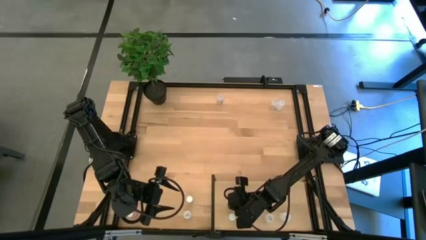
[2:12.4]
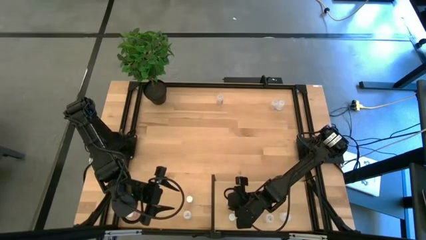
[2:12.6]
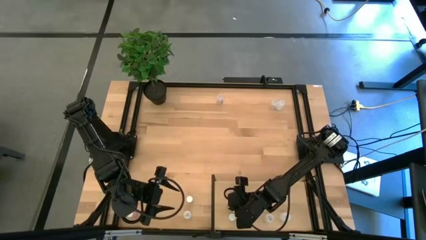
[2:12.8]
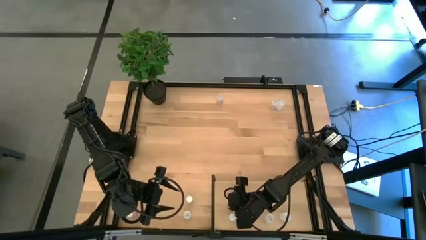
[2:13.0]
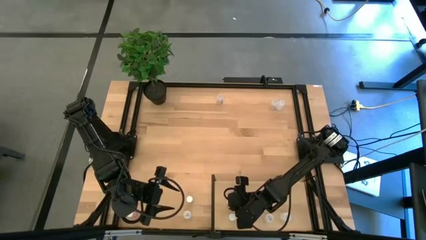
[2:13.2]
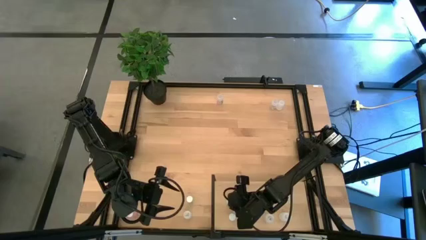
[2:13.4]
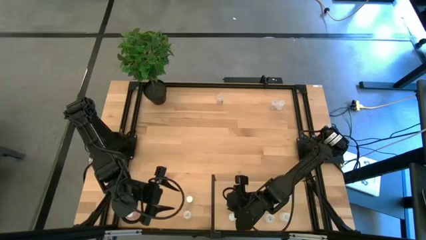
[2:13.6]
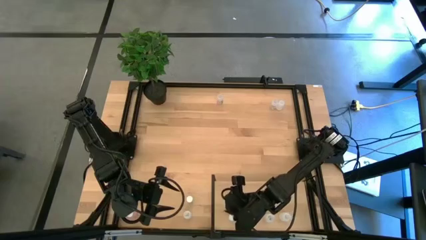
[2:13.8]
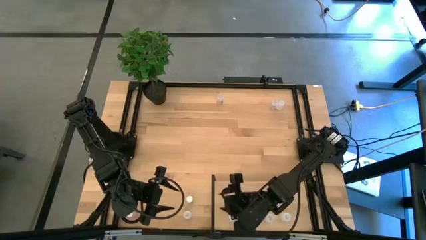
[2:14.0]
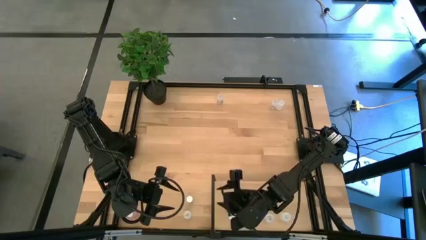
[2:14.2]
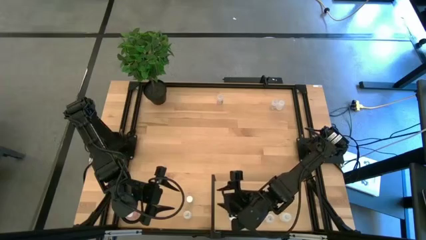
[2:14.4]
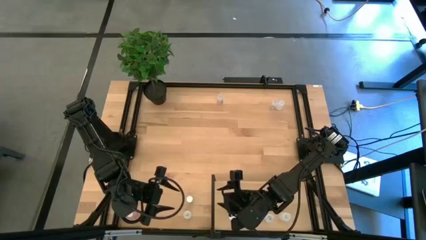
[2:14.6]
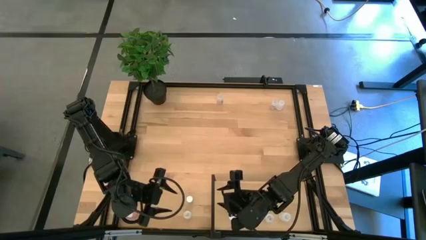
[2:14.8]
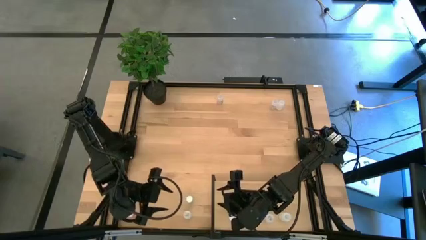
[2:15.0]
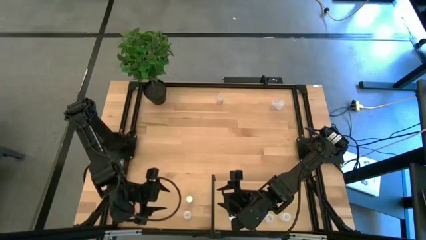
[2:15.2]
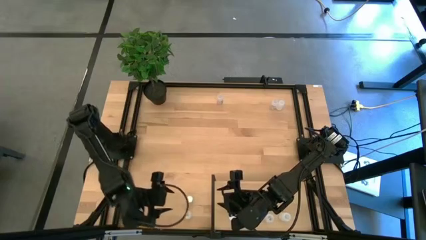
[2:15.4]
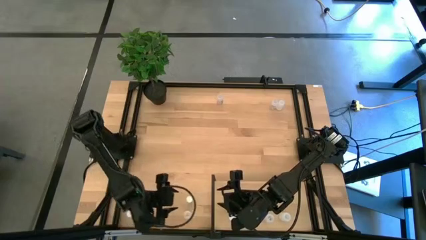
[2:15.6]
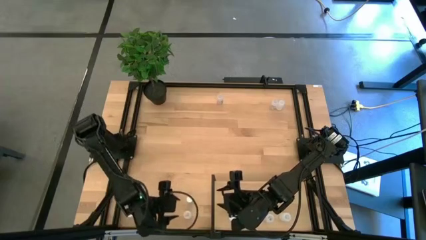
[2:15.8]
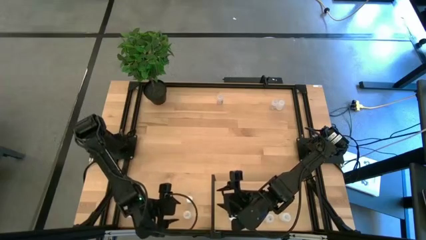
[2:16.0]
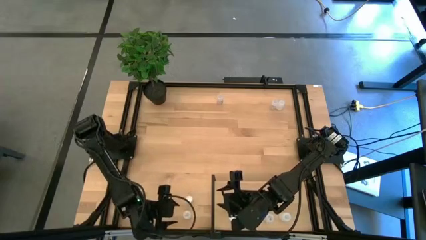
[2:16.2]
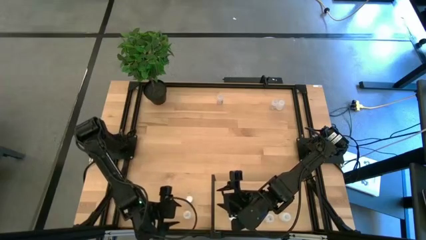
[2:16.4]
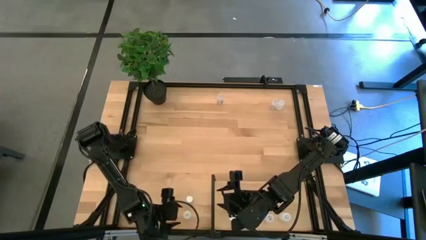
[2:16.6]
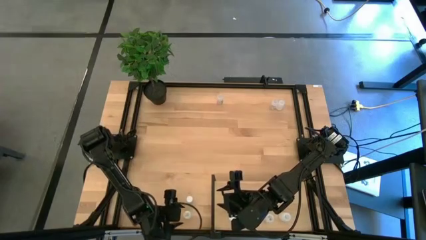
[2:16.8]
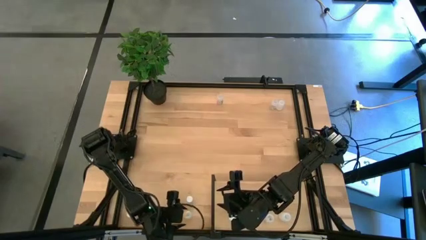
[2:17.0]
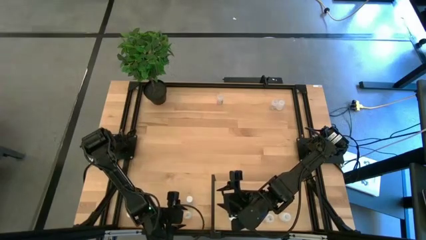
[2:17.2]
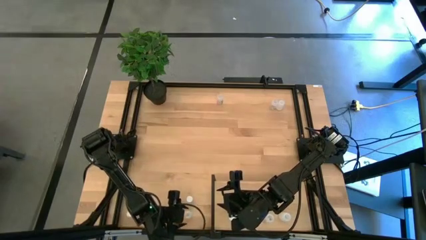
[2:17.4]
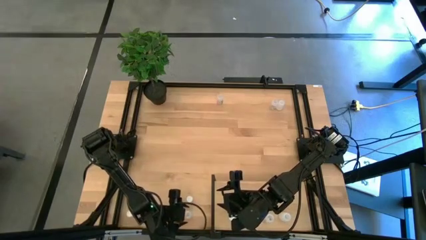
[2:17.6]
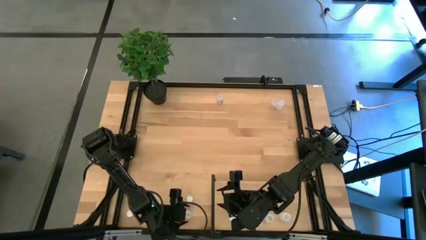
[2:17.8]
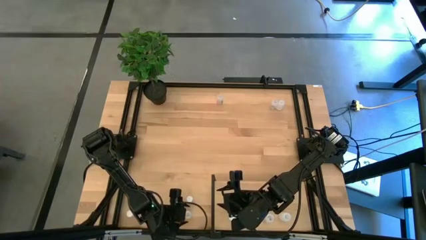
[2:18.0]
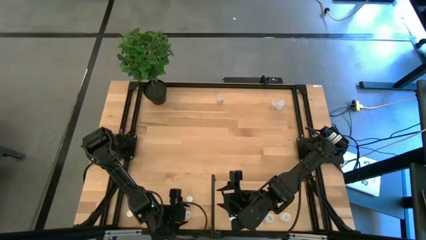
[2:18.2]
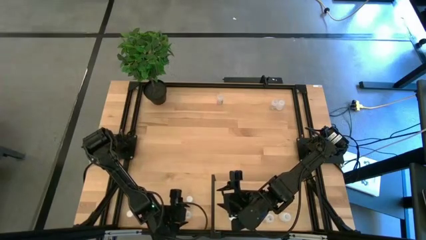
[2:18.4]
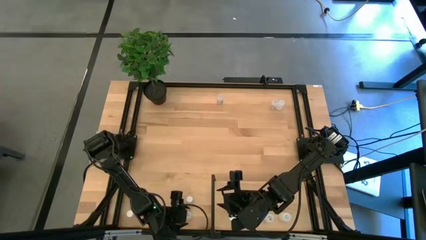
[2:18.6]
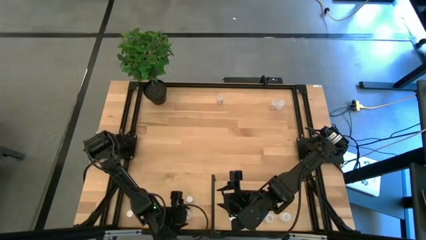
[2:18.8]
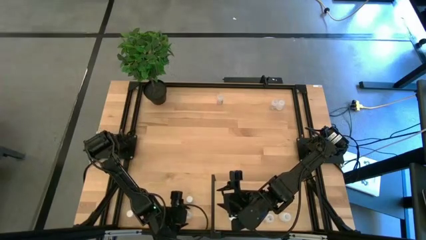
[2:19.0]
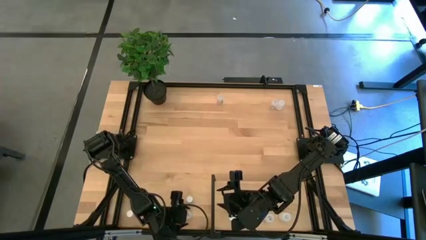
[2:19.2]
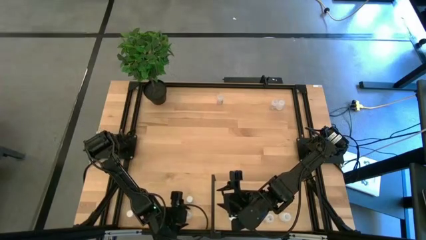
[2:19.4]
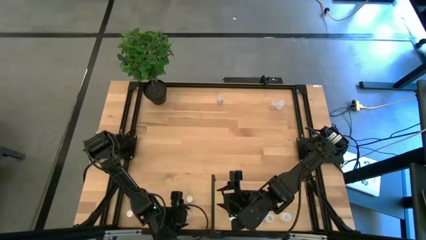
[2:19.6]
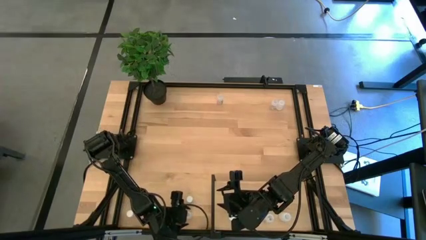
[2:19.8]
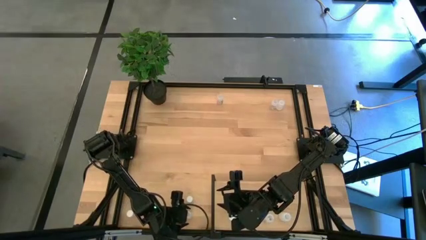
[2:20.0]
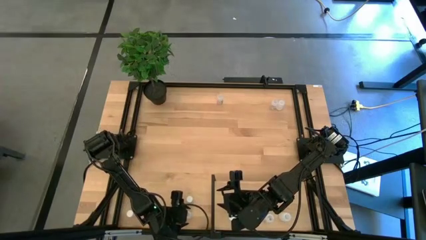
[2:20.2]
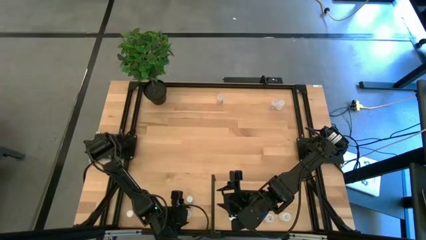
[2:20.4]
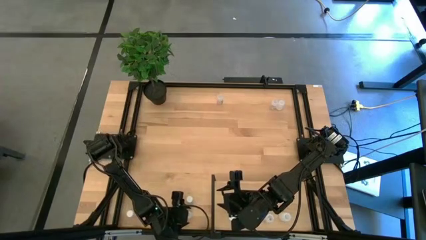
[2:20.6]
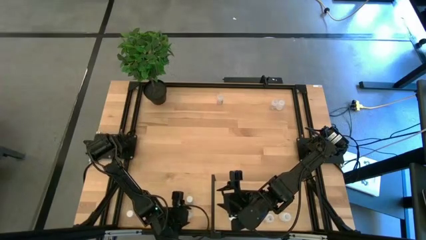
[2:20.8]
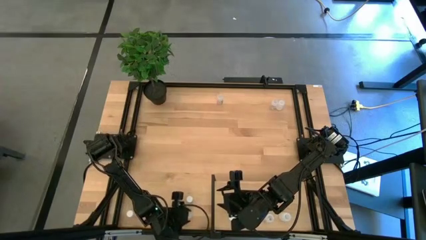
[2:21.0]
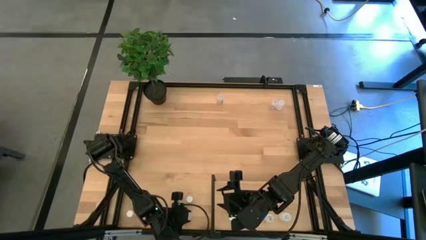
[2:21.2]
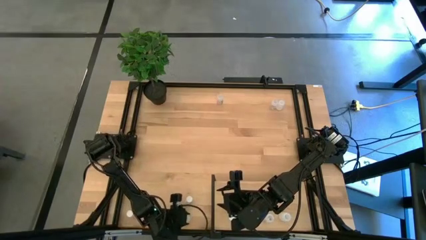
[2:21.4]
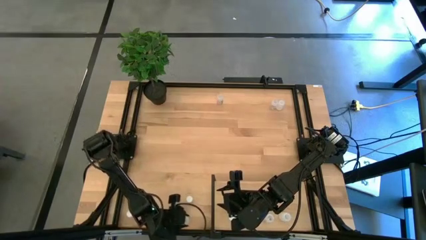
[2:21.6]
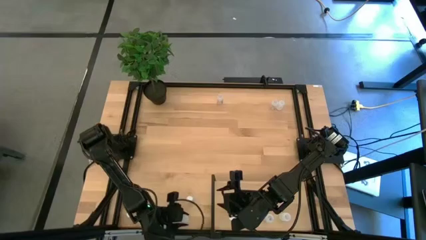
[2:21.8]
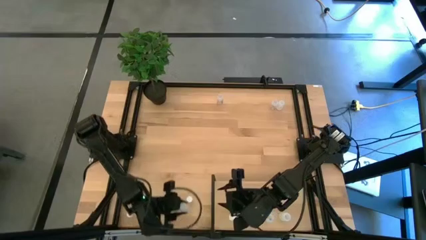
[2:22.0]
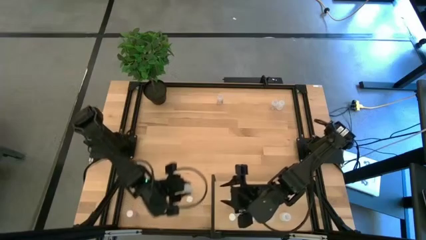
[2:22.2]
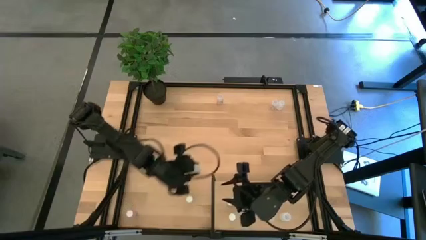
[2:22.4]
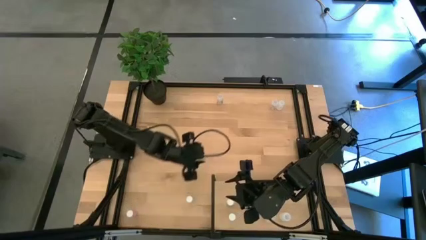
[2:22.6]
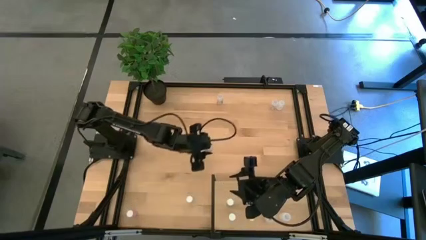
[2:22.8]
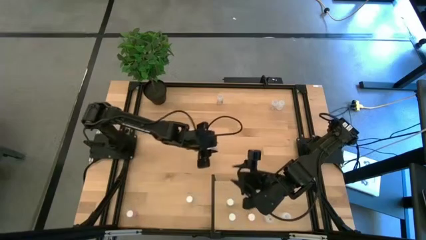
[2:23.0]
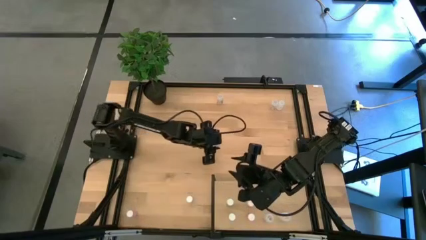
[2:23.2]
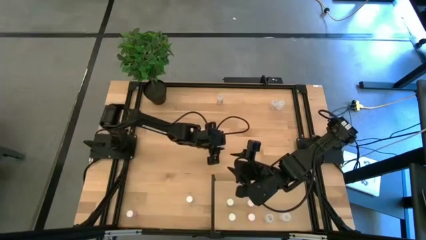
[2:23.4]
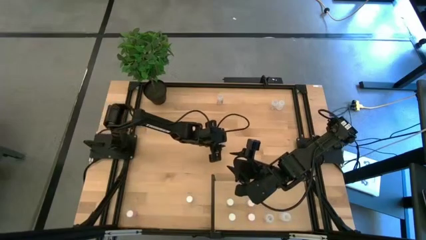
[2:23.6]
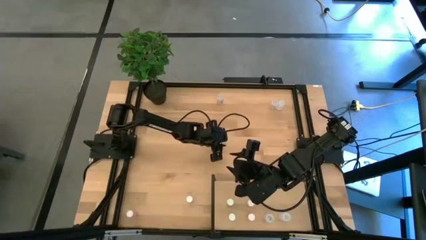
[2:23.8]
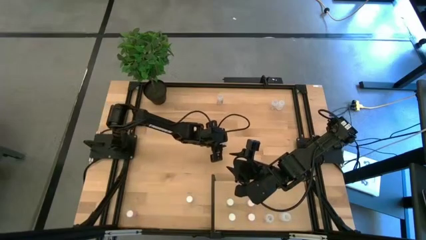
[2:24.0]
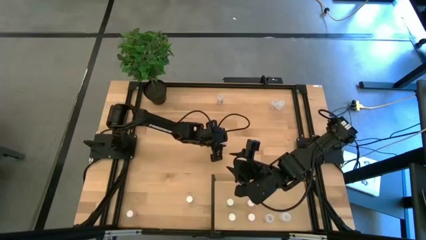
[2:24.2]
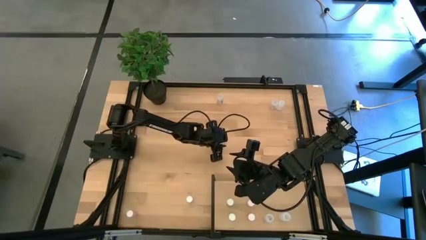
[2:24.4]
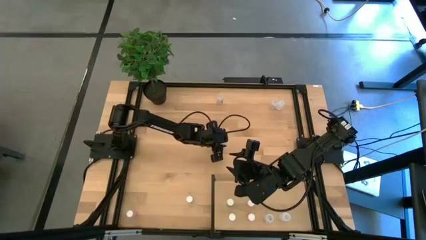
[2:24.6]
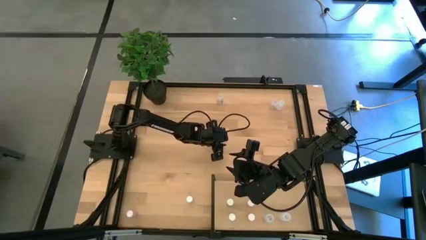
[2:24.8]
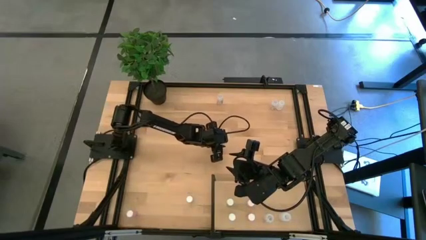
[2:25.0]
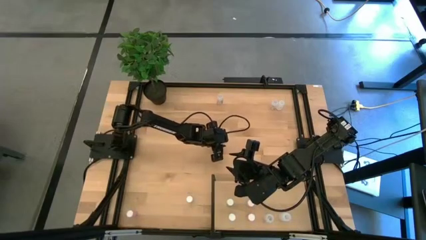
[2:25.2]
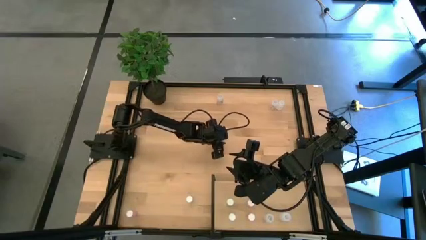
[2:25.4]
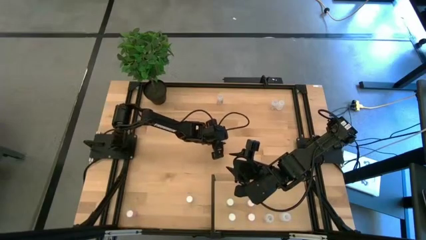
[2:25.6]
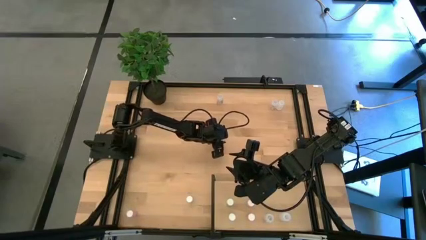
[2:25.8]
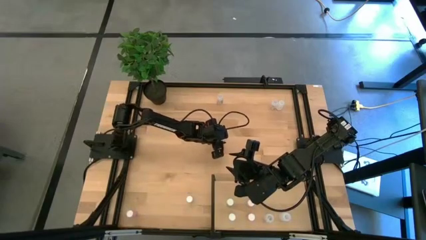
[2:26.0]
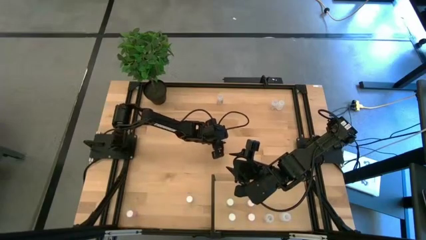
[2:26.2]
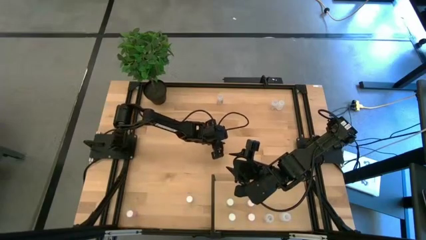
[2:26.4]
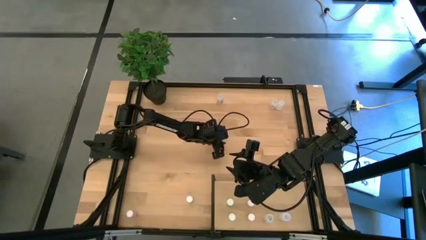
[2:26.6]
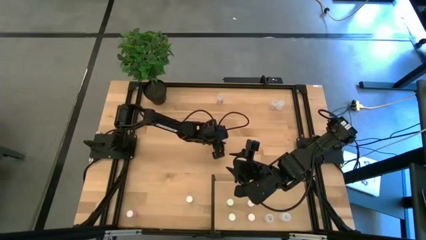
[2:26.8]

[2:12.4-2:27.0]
Task: Pick and place medicine bottles onto shelf by color
Put the bottom white pill bottle on the shelf aligned with the other white pill bottle
